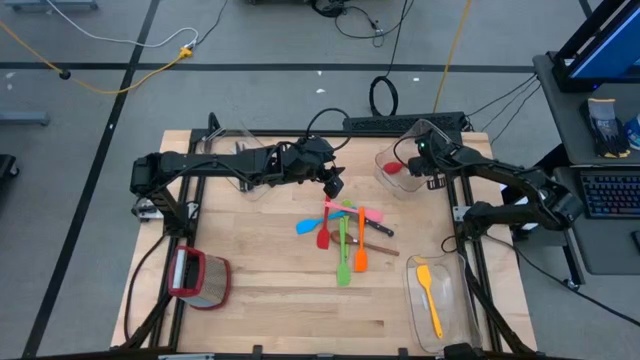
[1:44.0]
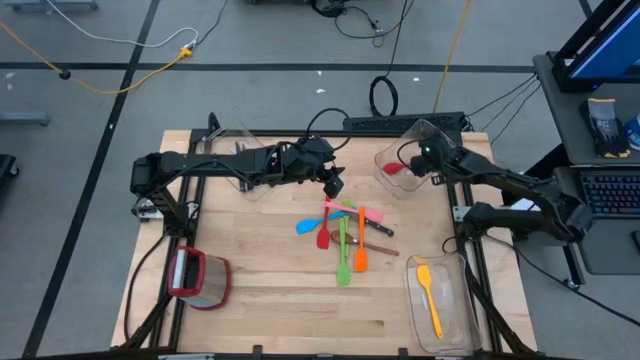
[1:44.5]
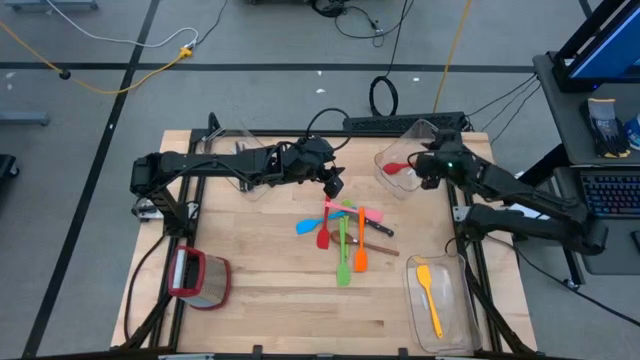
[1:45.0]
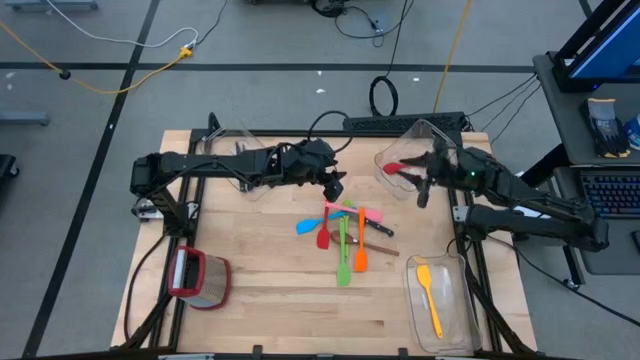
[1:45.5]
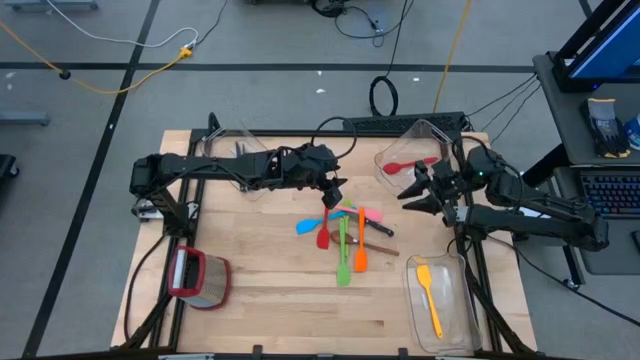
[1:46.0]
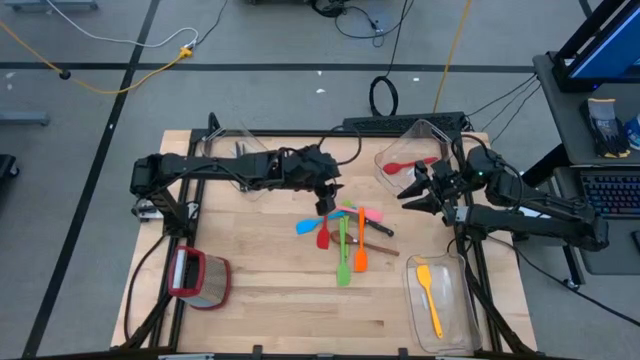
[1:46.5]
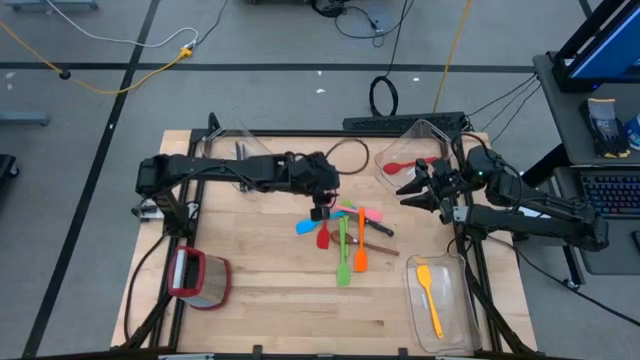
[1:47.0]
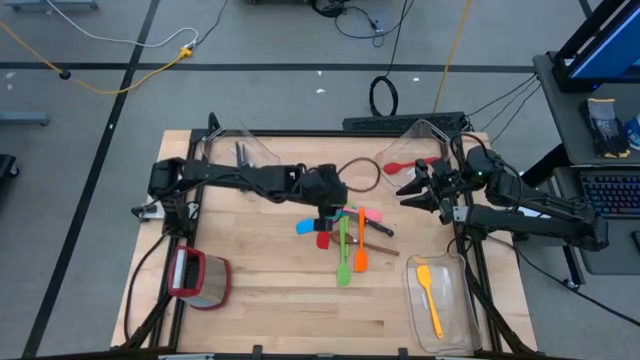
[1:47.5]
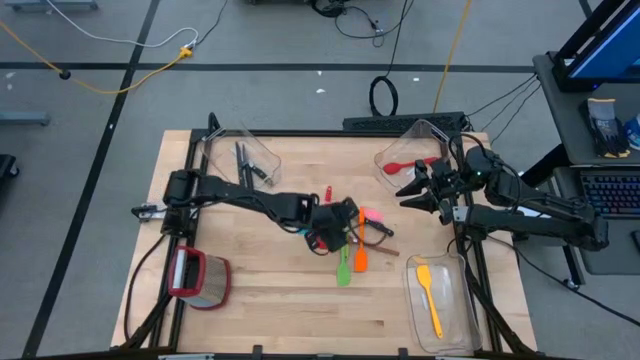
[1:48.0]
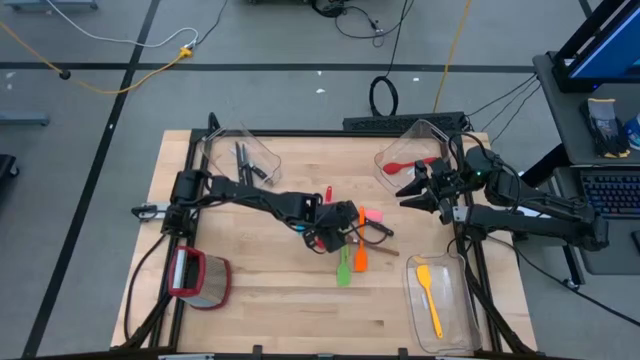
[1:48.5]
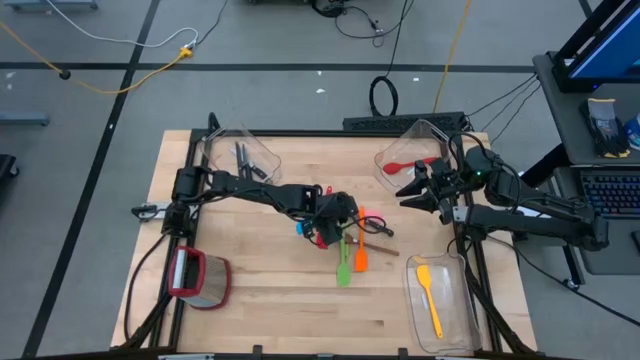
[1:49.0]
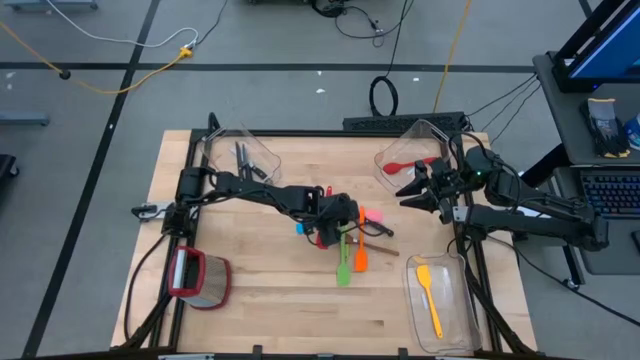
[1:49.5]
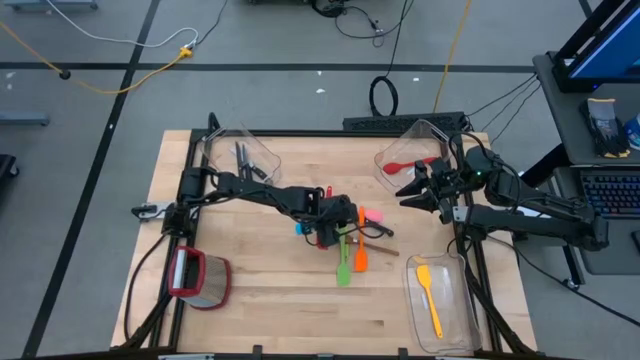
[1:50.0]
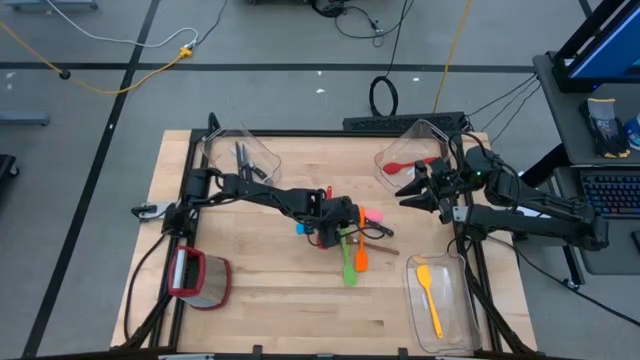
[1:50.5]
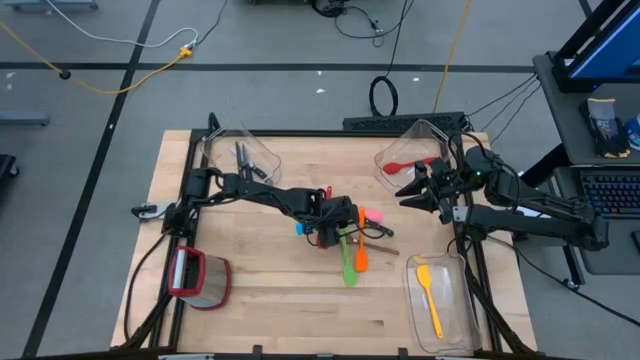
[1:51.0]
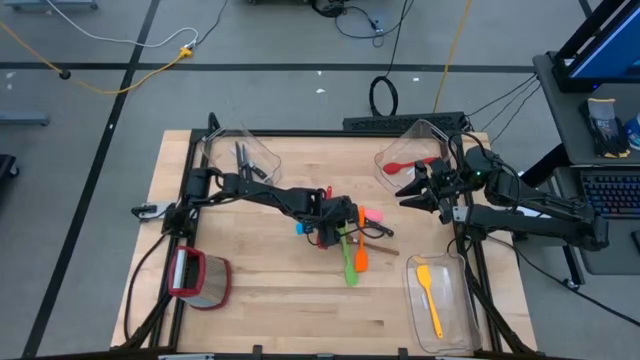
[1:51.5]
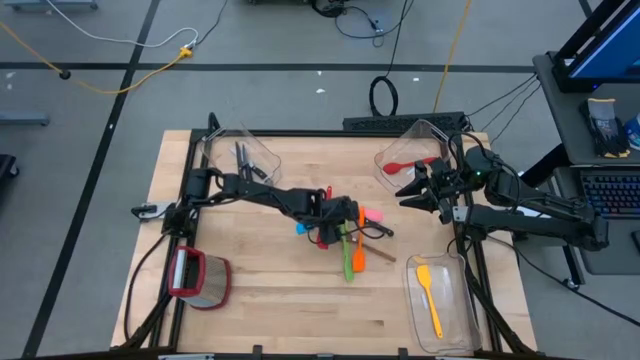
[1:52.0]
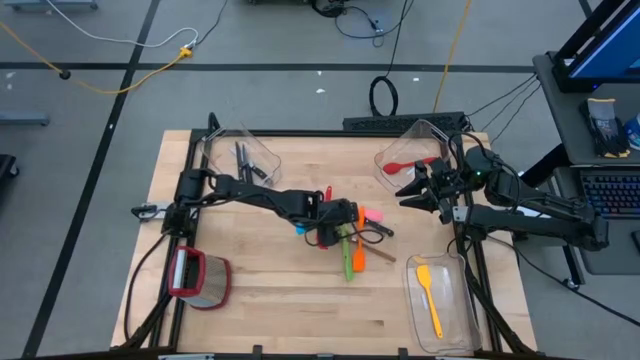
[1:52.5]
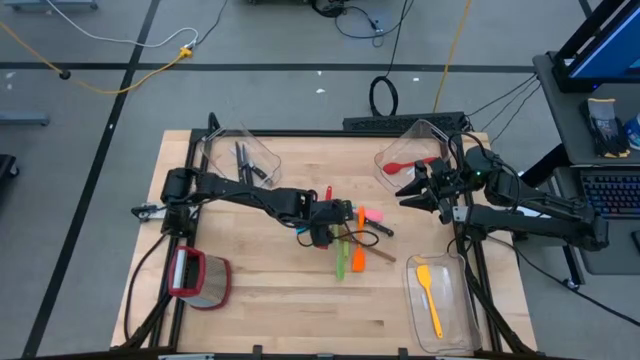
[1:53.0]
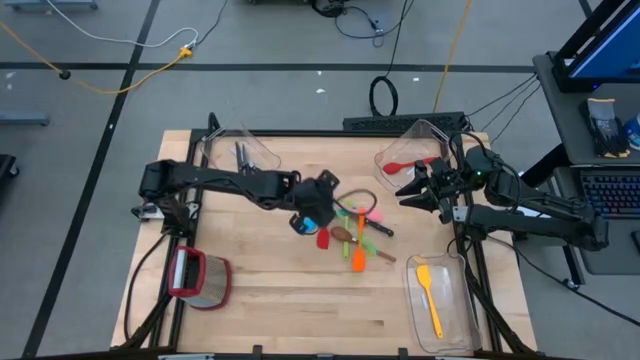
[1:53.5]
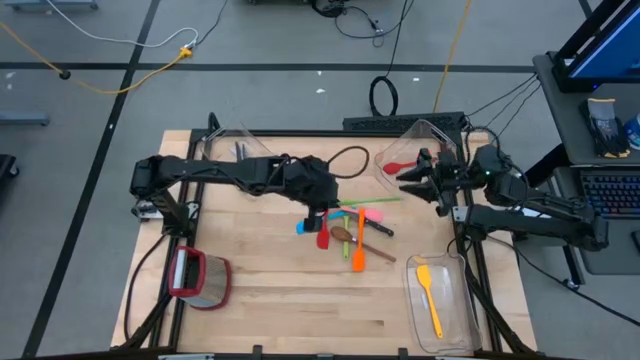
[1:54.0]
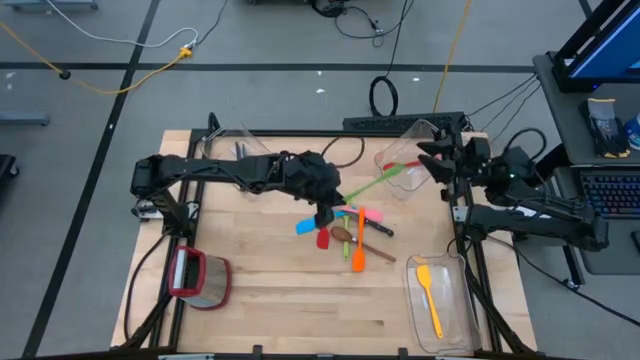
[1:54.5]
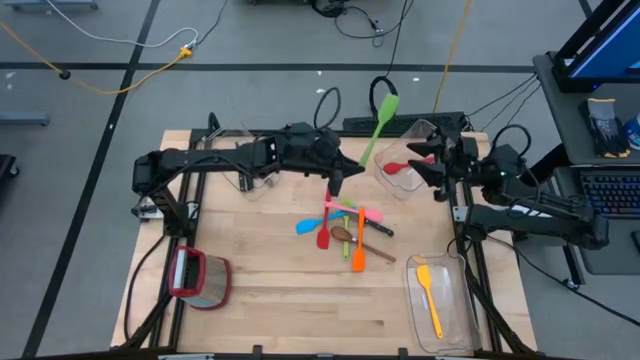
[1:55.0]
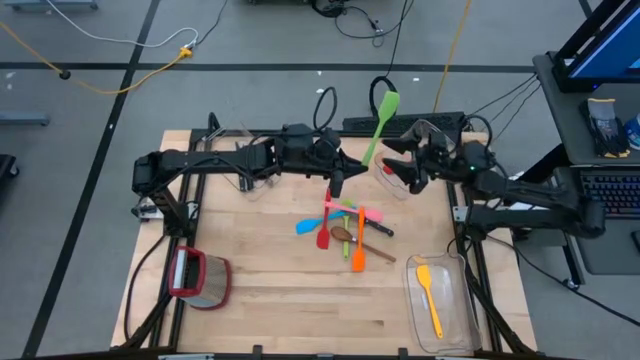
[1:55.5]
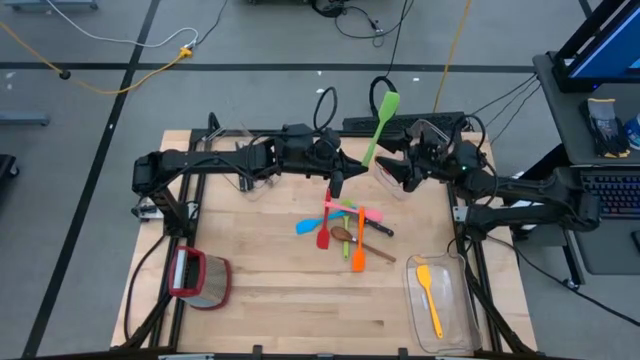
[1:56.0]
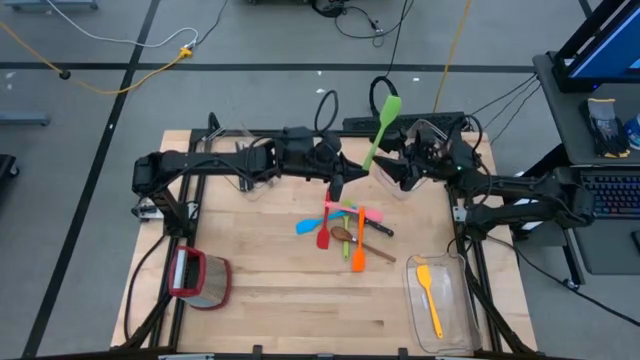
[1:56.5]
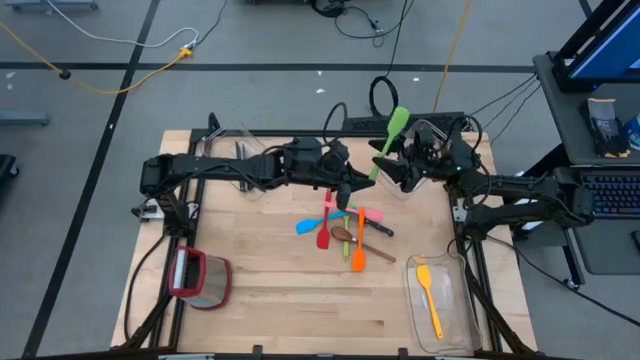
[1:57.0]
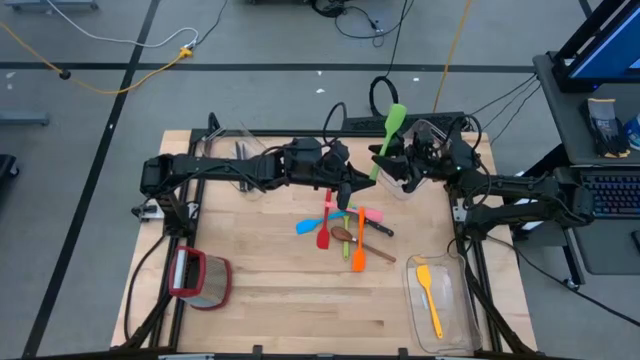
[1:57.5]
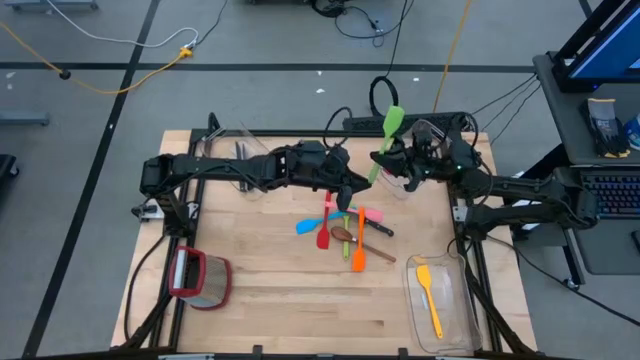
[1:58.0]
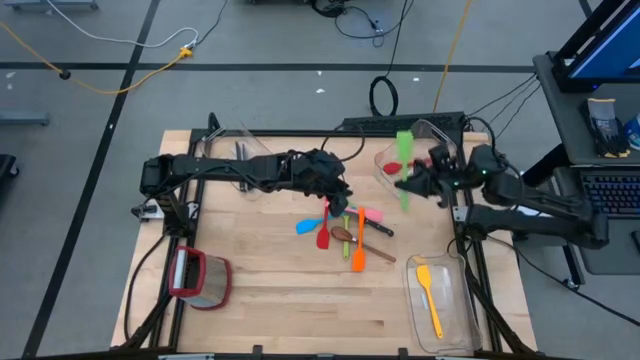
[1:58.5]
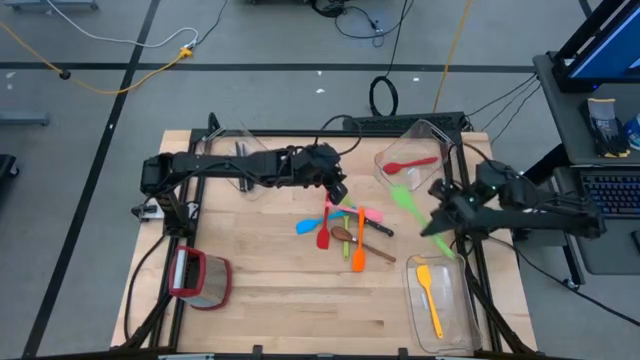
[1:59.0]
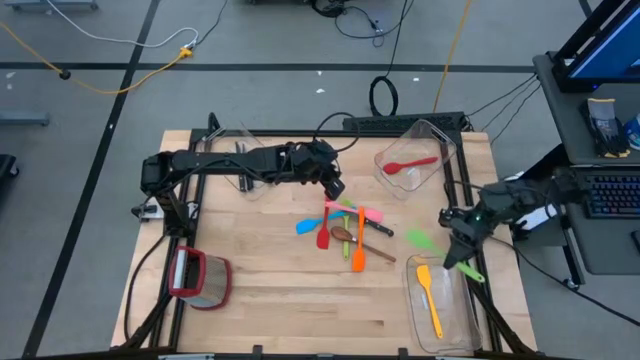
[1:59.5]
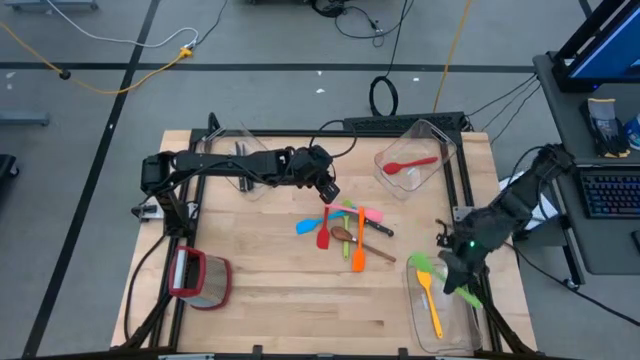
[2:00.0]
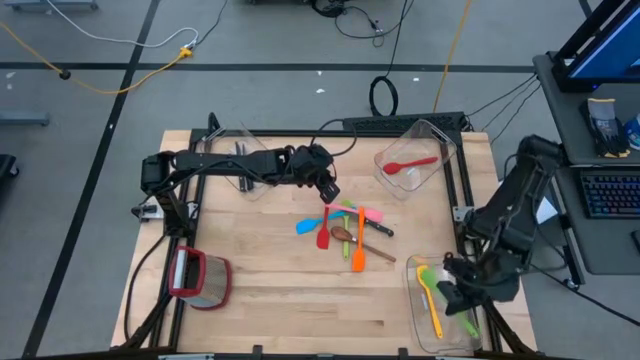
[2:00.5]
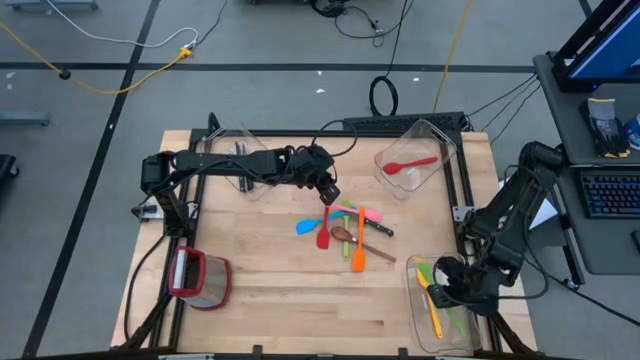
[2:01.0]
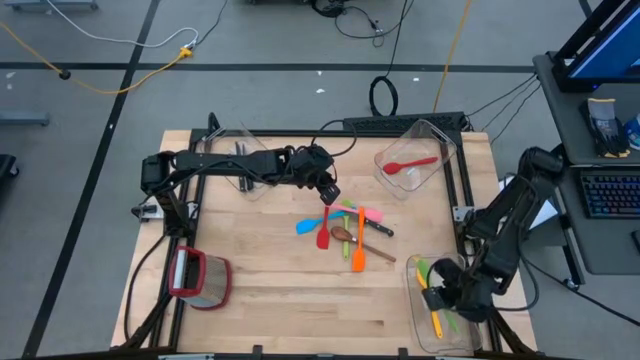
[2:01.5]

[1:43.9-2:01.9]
Task: Pick & Place Kitchen Items
Put the green spatula into the bottom transparent bin

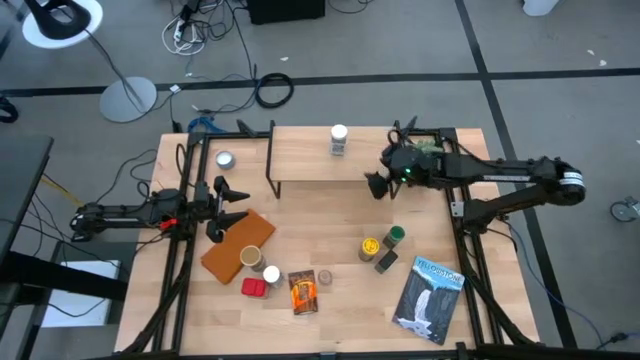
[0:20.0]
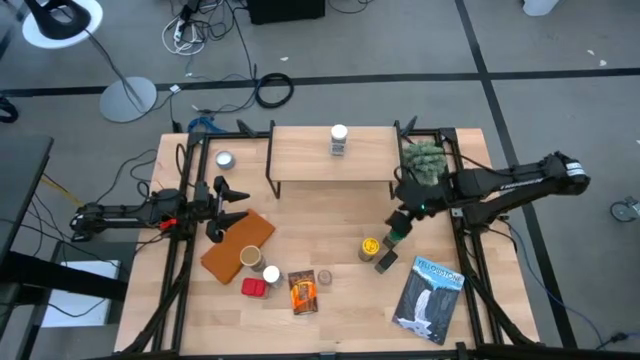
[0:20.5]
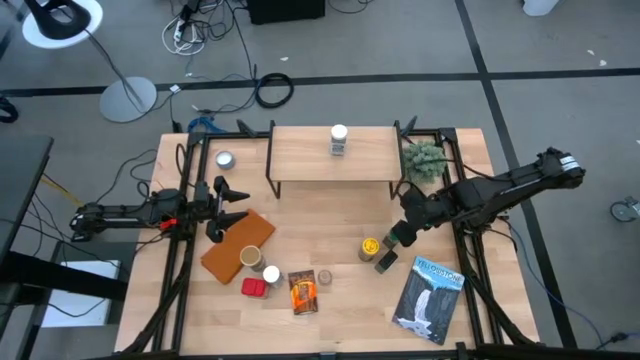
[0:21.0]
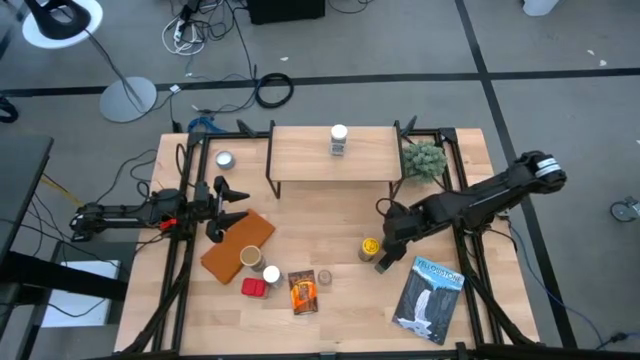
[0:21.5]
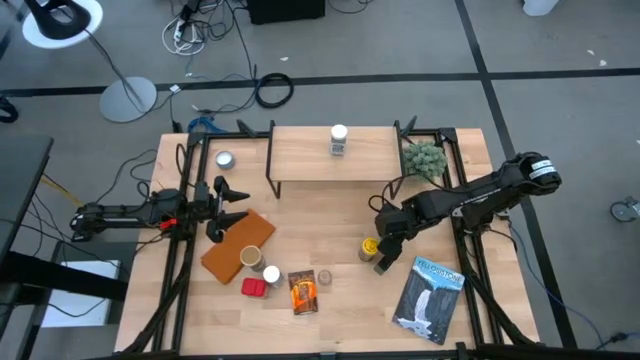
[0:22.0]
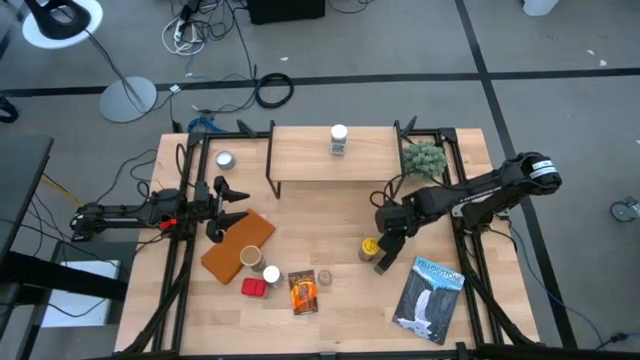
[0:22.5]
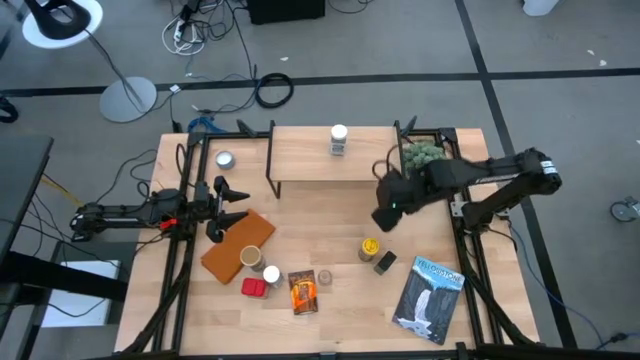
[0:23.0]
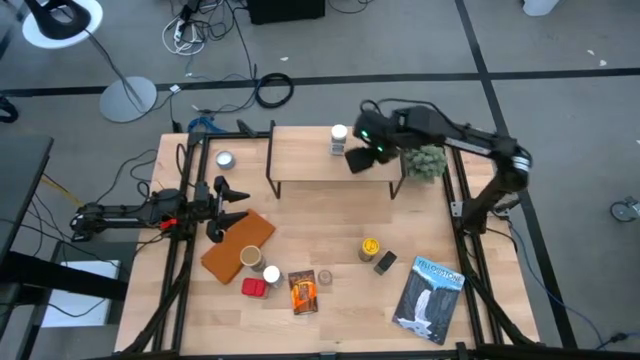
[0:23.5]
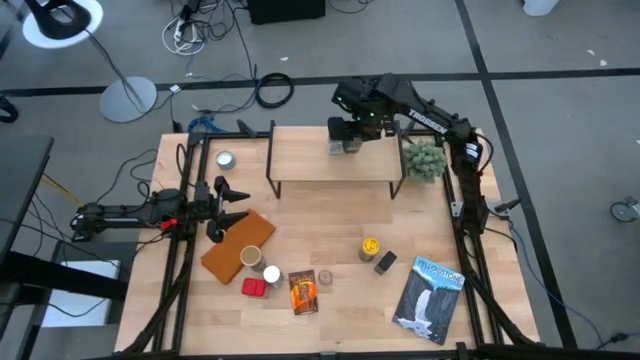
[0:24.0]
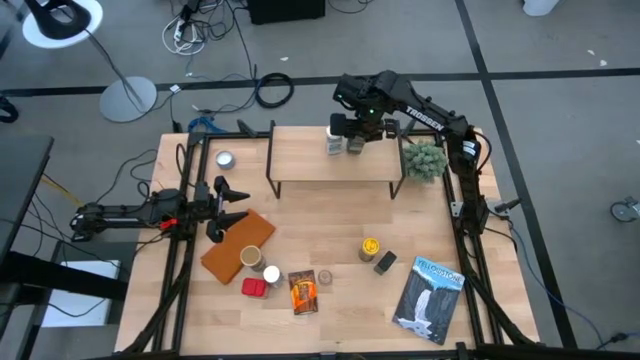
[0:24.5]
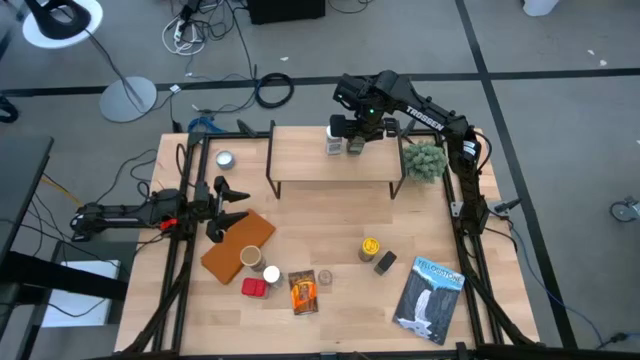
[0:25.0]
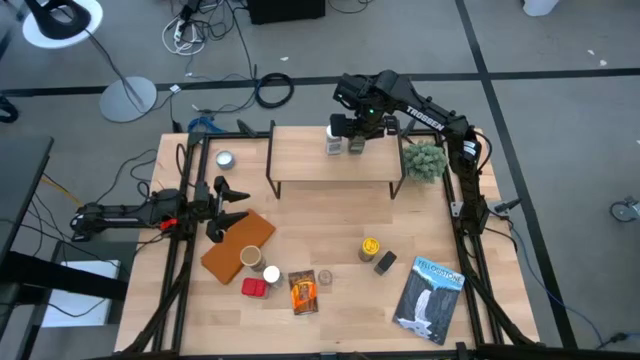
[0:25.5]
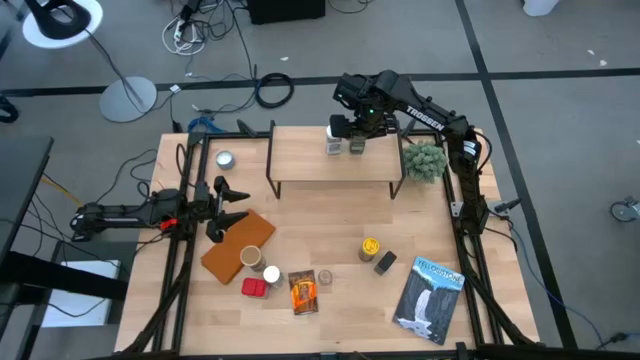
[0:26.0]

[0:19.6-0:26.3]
Task: Shelf spices
Put the green seasoning bottle on the shelf
